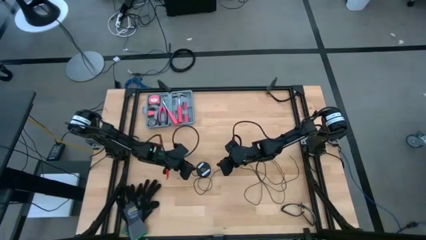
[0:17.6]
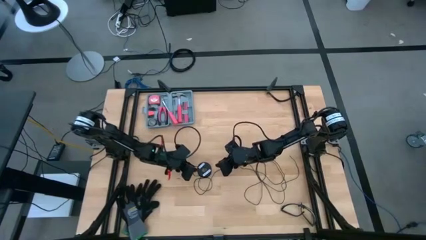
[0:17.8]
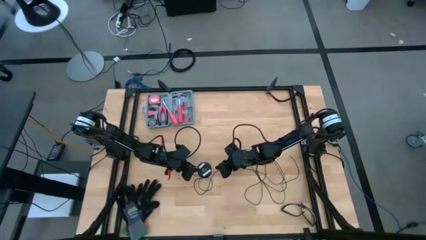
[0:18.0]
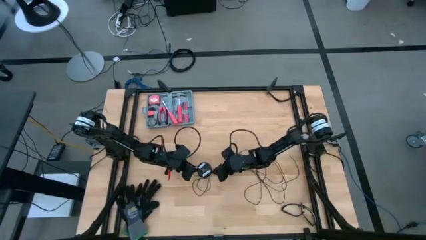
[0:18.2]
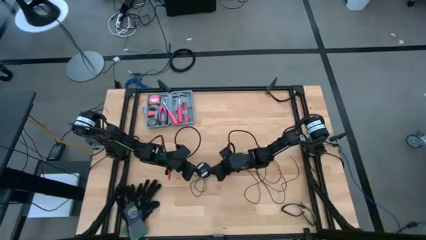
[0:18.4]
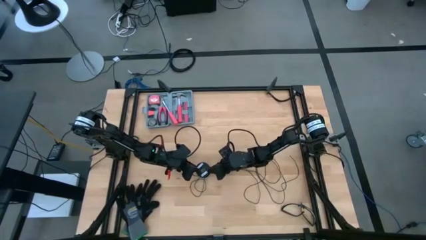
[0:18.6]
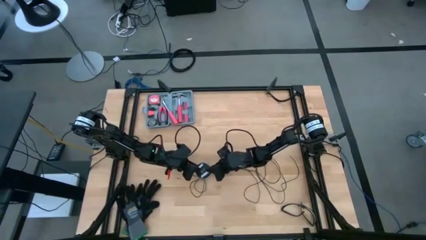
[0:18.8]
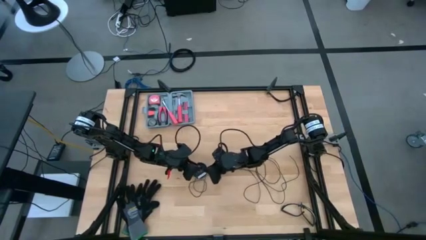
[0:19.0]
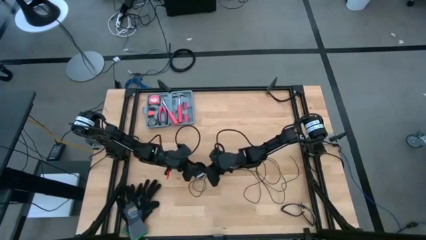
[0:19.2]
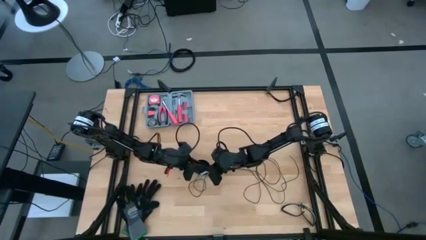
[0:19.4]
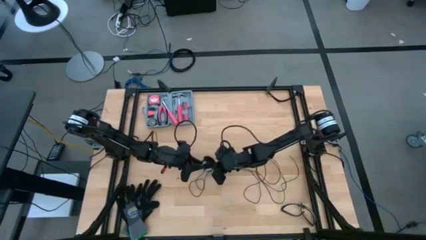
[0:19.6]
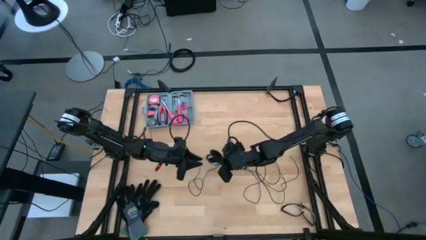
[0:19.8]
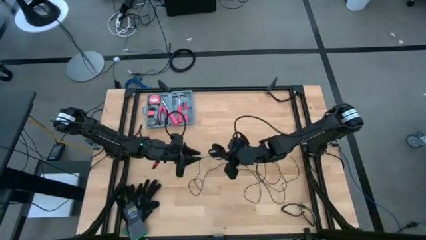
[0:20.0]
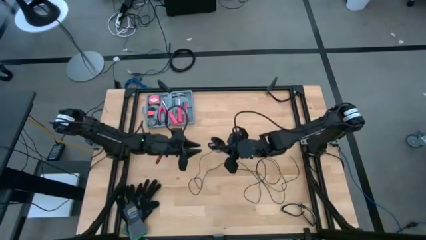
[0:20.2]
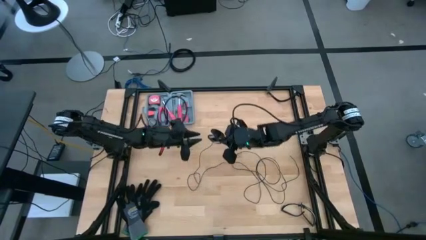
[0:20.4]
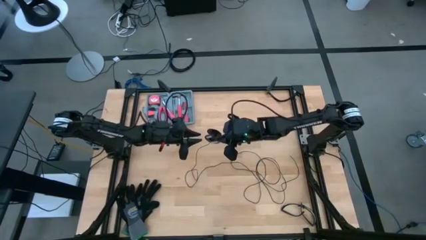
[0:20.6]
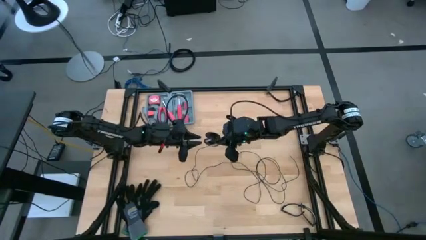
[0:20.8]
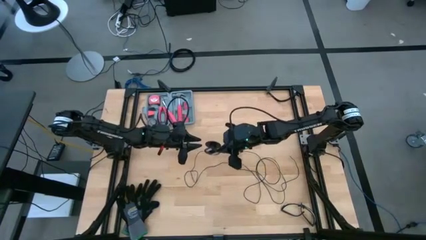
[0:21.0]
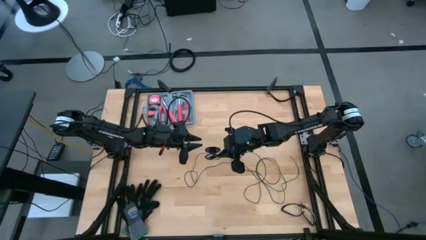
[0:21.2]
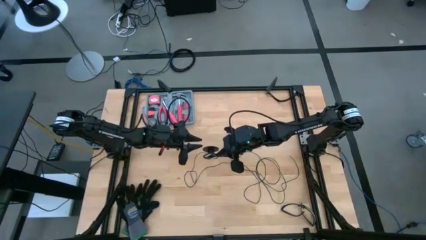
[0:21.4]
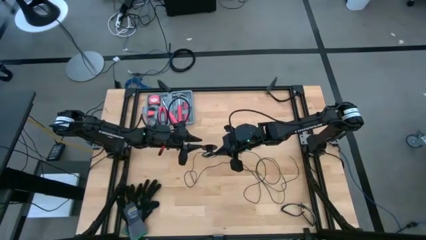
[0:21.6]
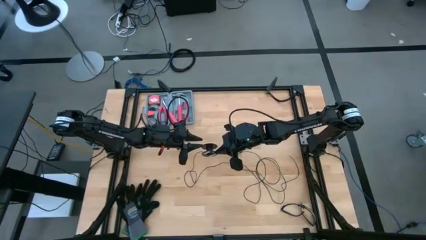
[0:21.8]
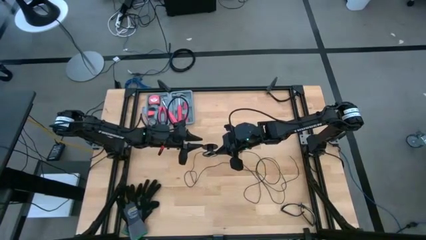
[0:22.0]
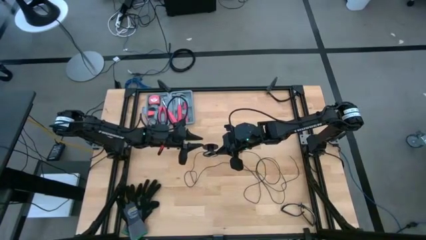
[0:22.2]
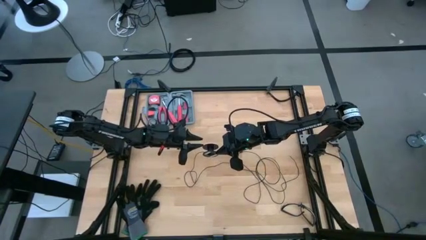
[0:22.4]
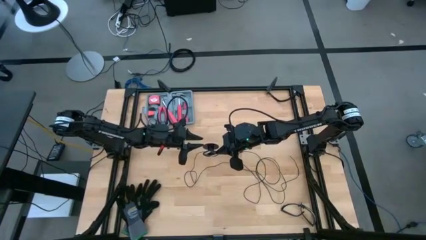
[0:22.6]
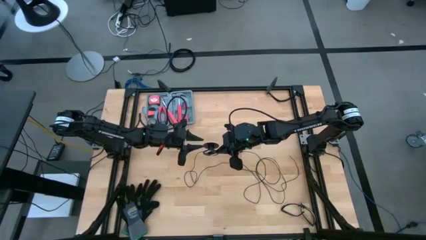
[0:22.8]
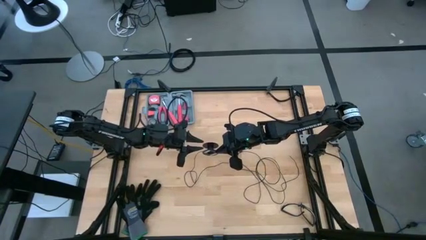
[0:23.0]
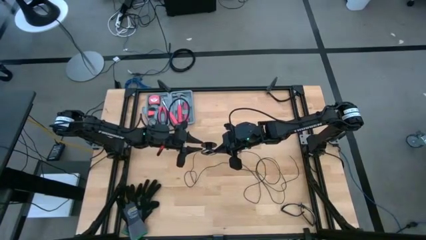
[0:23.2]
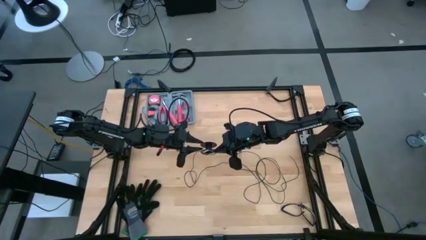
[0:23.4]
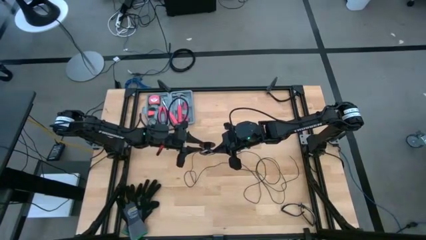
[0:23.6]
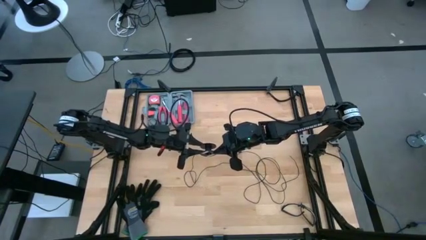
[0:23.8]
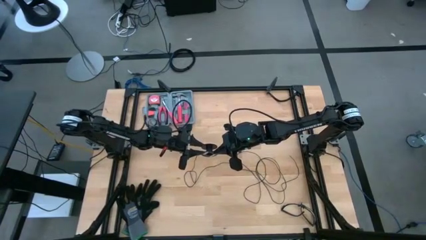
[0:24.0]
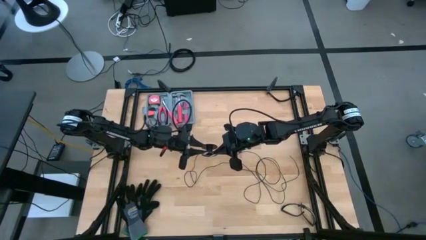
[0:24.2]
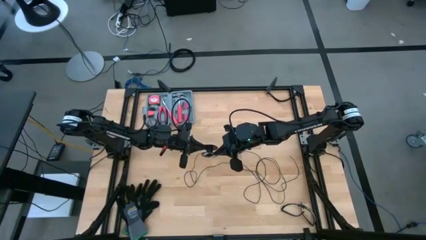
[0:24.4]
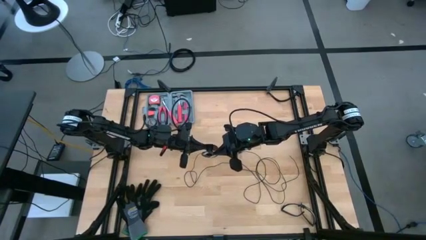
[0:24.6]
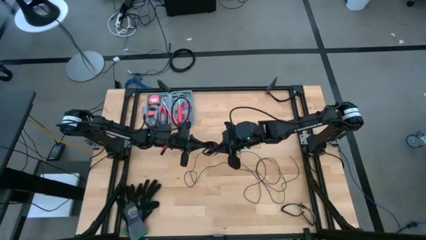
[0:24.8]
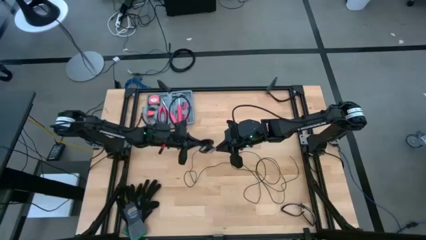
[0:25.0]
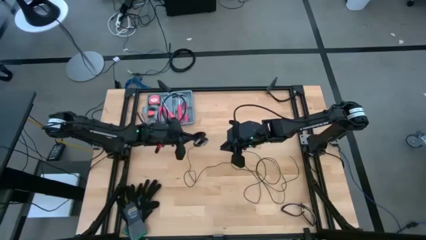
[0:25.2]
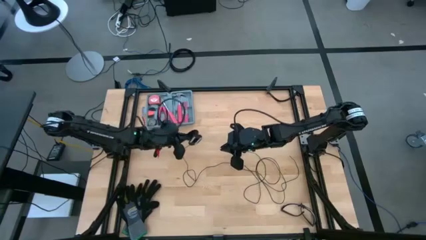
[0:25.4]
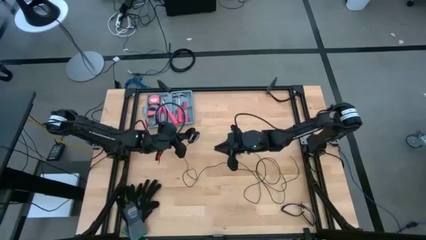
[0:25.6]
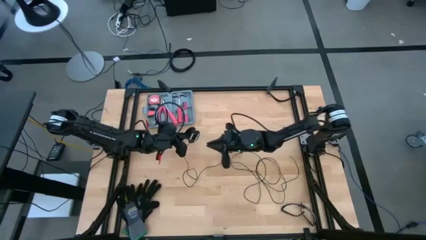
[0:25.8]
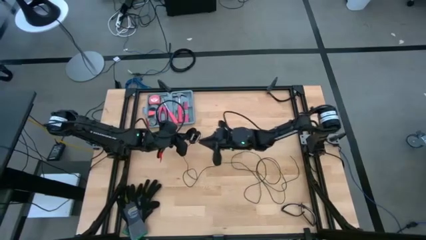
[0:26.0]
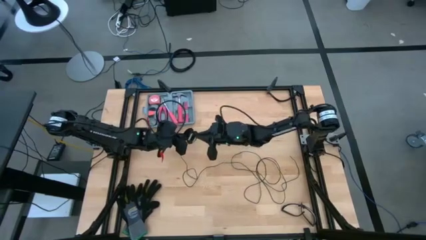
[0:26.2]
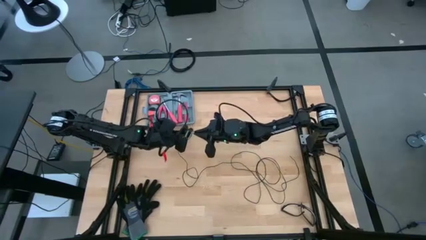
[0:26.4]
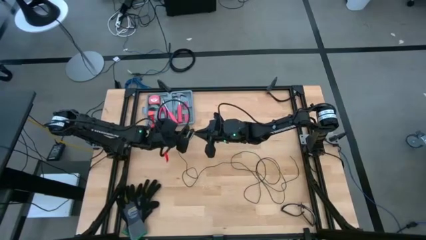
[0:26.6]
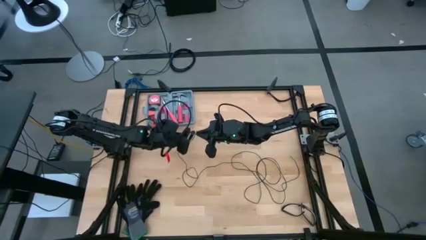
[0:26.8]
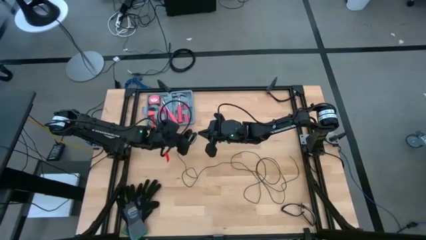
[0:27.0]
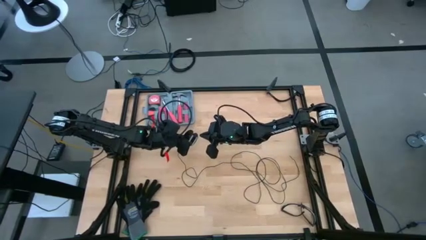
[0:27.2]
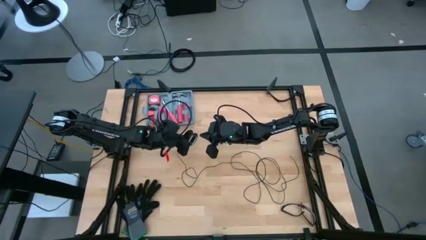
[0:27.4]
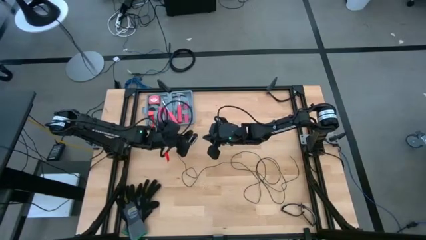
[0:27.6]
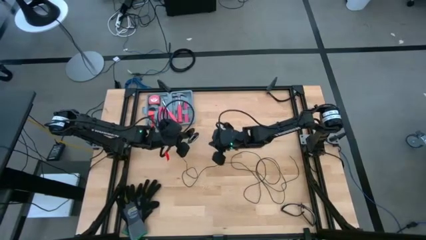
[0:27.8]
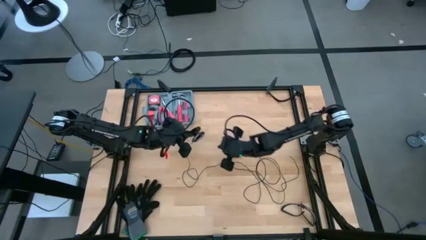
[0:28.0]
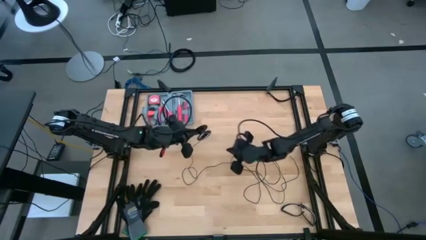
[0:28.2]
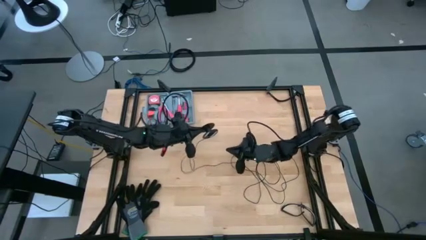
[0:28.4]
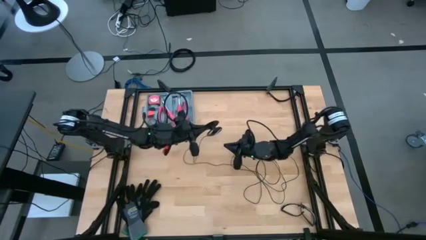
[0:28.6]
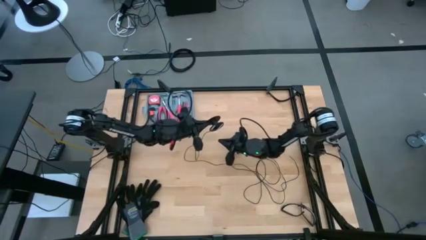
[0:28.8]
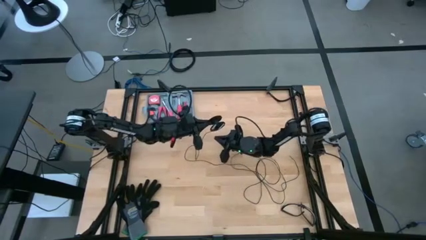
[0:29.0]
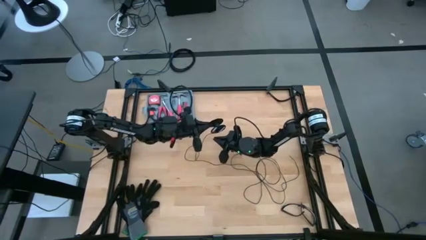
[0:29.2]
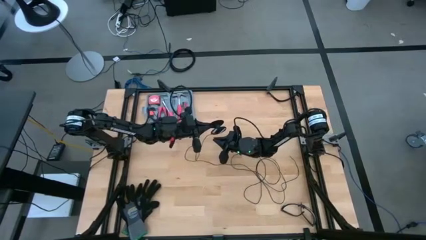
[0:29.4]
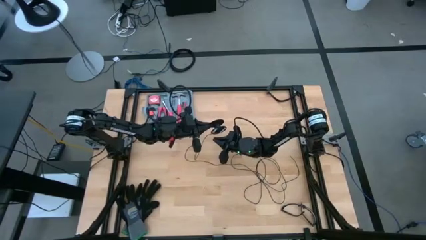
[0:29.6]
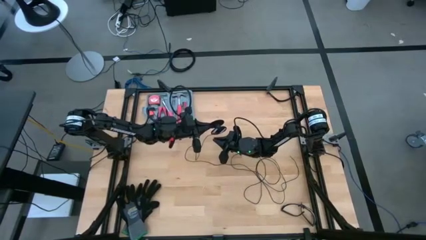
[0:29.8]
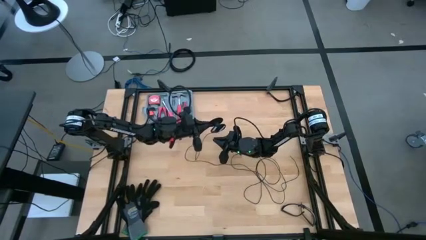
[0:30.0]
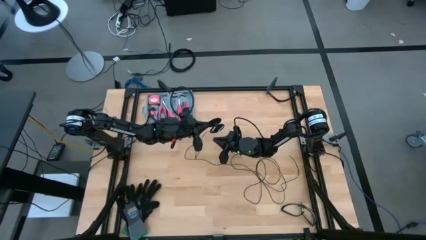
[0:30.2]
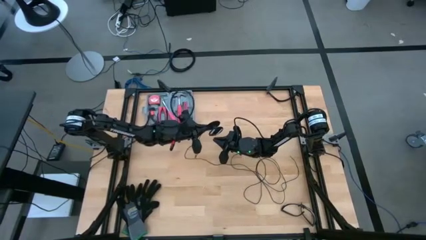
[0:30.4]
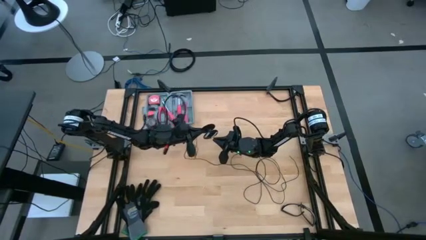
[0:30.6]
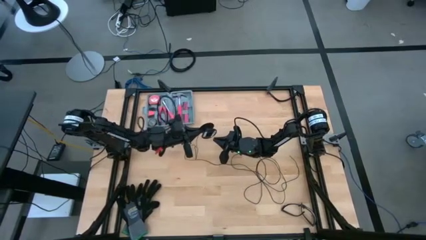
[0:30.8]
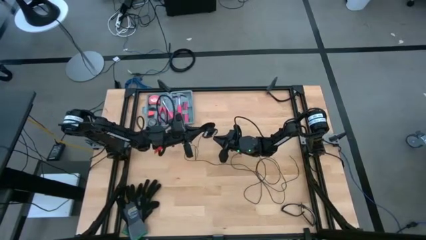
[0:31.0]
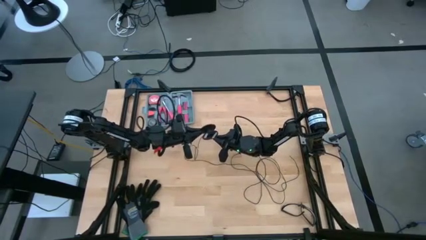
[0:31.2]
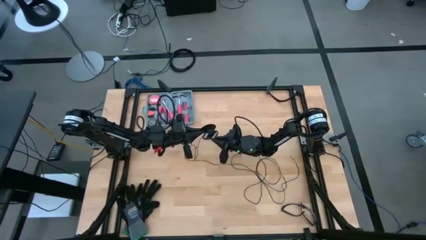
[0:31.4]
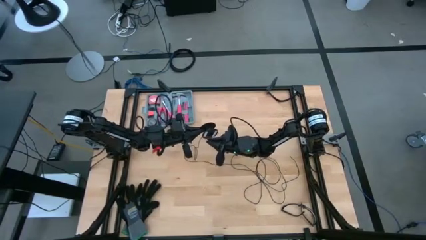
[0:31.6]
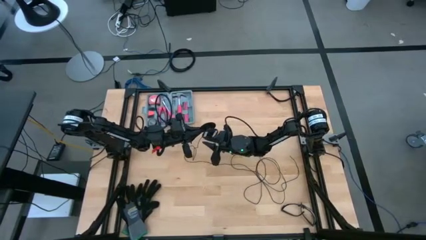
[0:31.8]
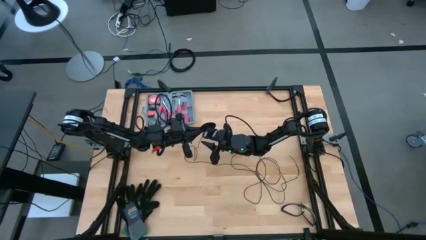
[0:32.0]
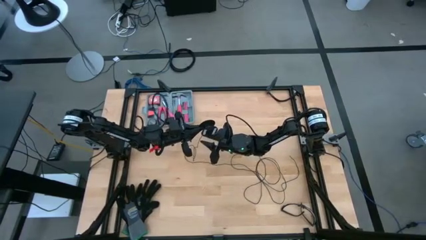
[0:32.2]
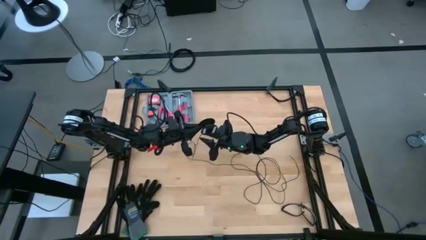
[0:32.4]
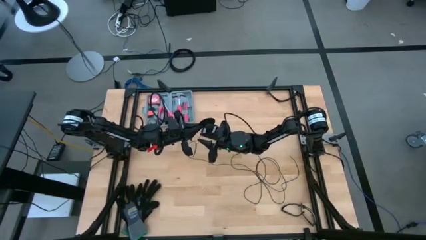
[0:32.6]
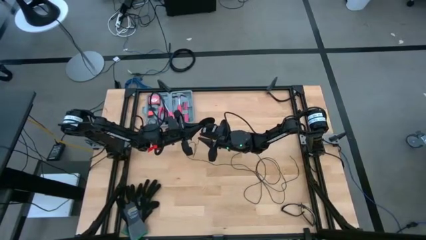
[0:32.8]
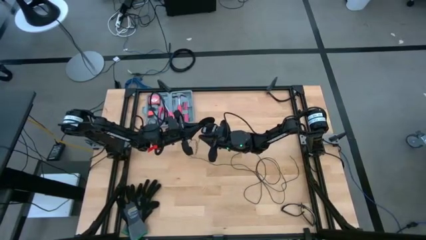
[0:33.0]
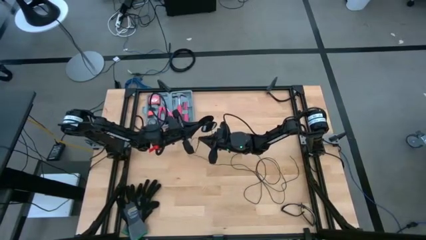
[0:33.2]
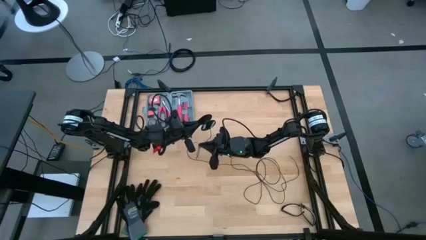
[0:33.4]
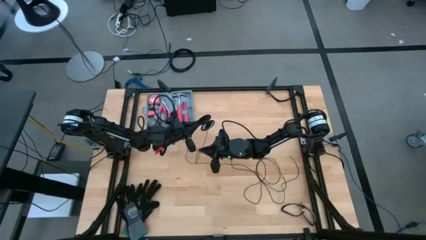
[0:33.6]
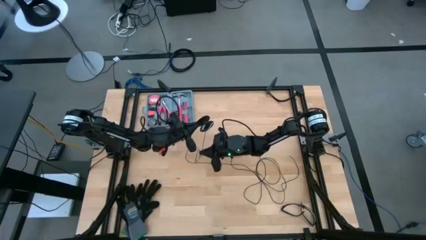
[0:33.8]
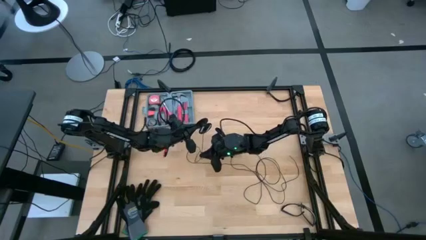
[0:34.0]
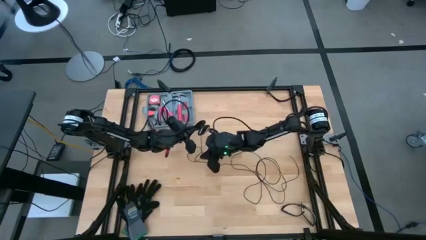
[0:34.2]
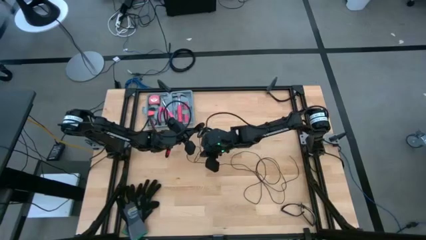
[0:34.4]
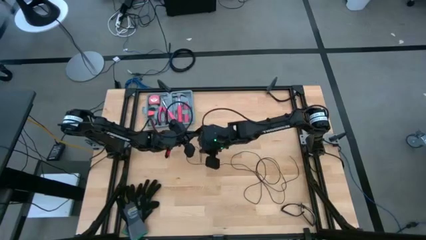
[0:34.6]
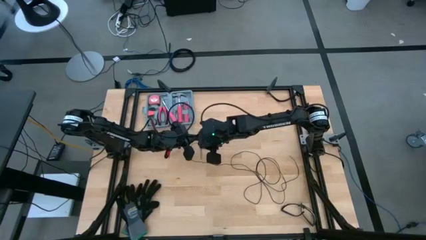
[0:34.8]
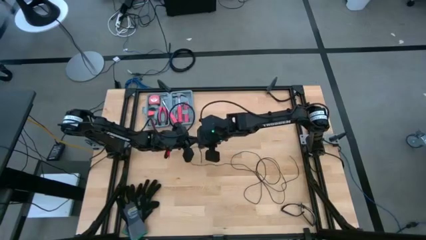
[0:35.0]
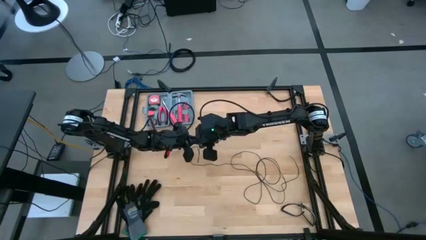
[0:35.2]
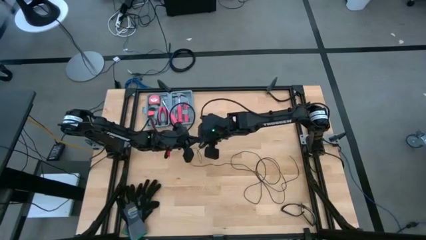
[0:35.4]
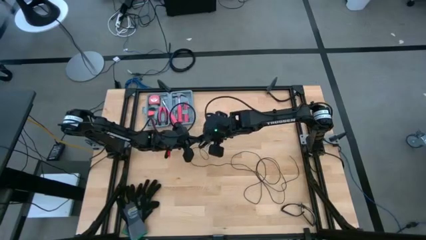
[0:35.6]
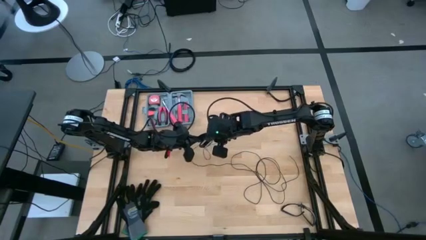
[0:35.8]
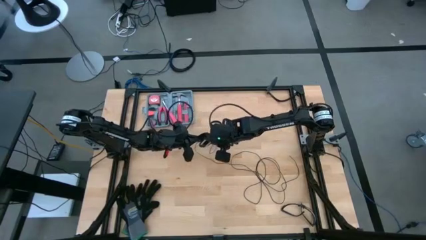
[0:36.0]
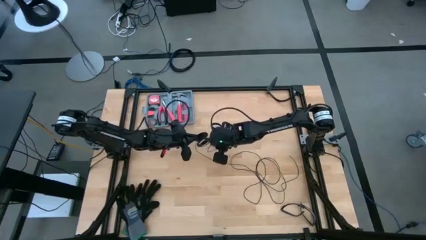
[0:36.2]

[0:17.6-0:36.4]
Task: Coil cords
Coil the black wire onto the spool
